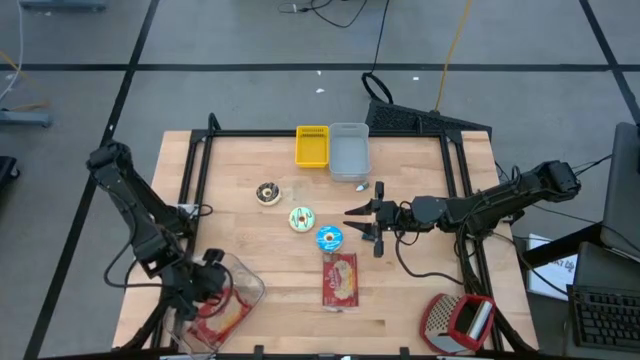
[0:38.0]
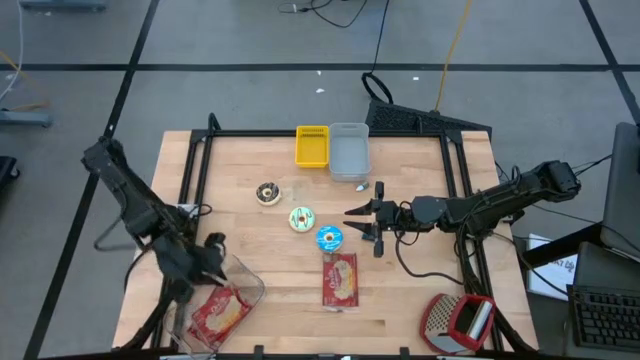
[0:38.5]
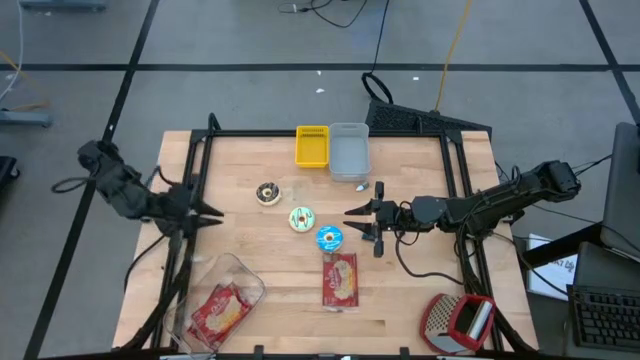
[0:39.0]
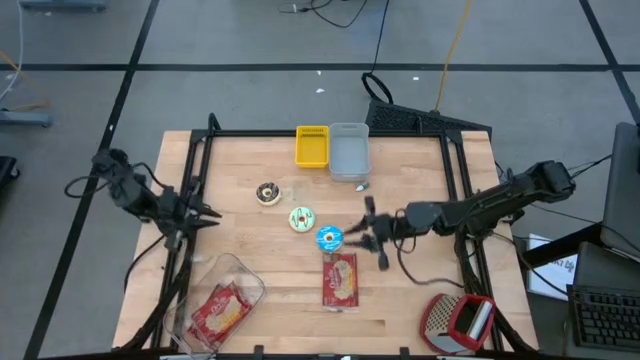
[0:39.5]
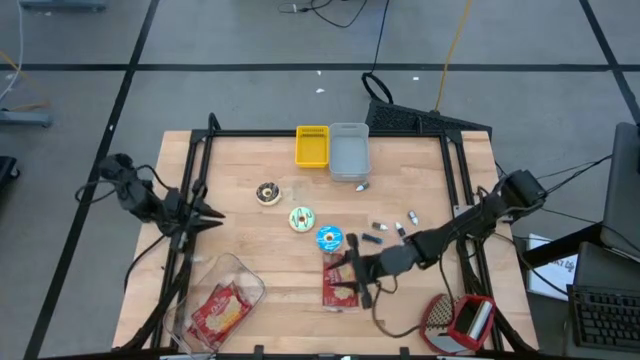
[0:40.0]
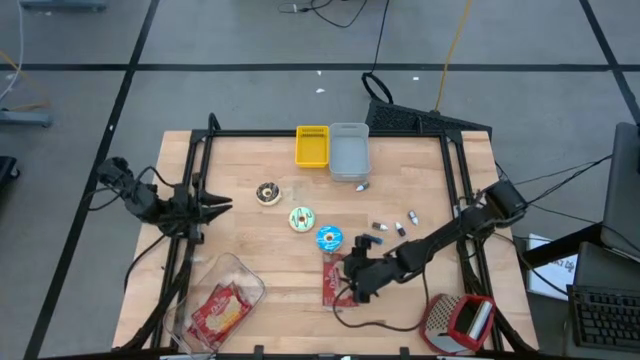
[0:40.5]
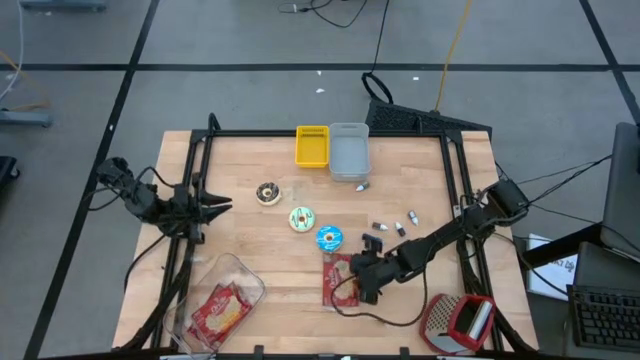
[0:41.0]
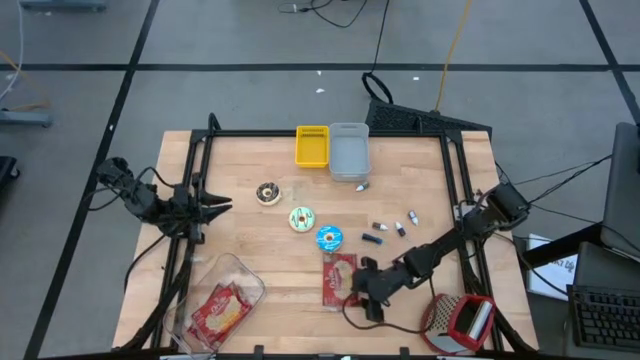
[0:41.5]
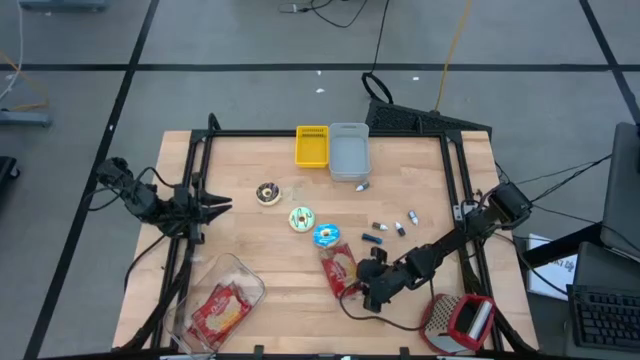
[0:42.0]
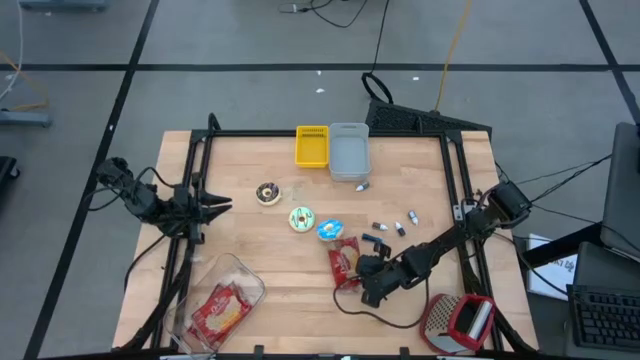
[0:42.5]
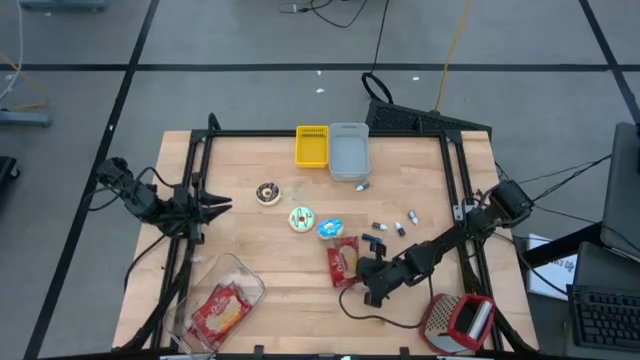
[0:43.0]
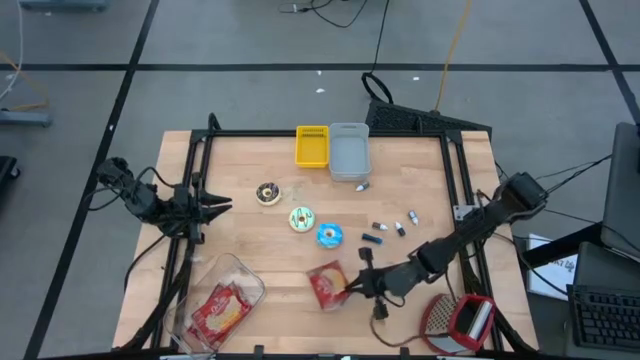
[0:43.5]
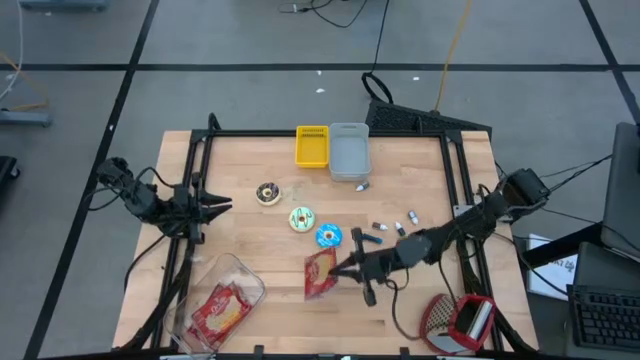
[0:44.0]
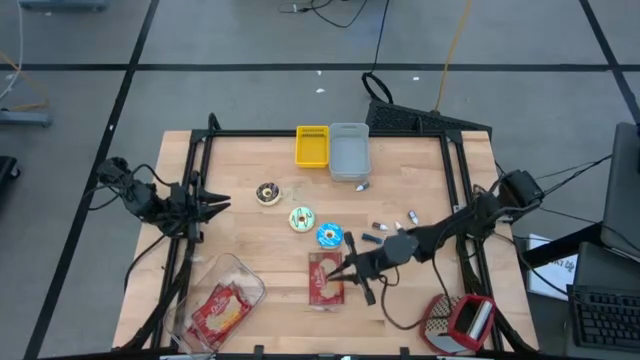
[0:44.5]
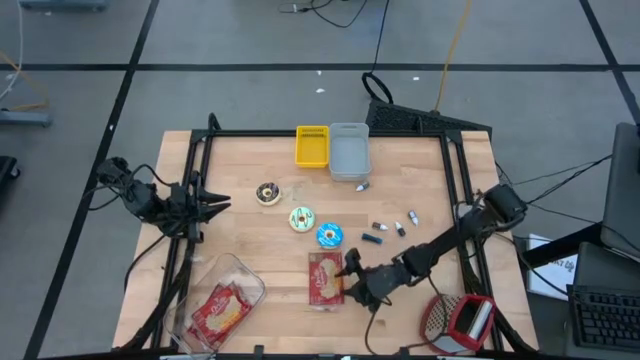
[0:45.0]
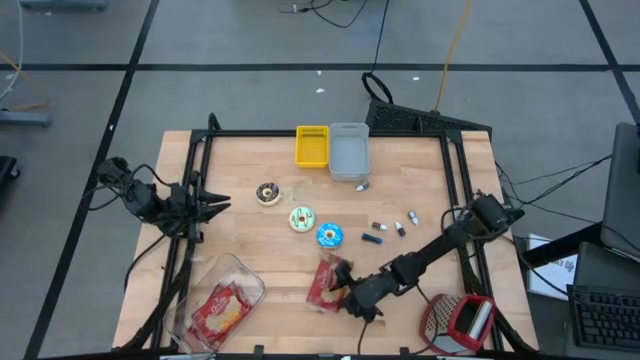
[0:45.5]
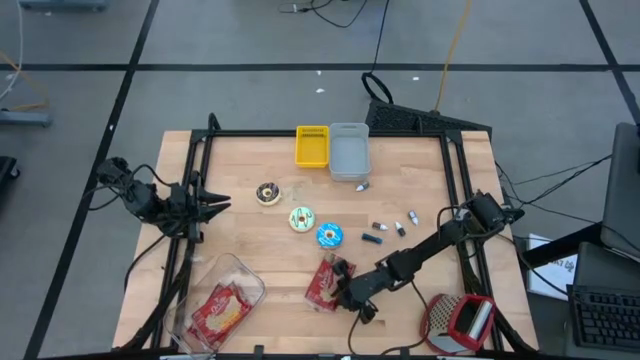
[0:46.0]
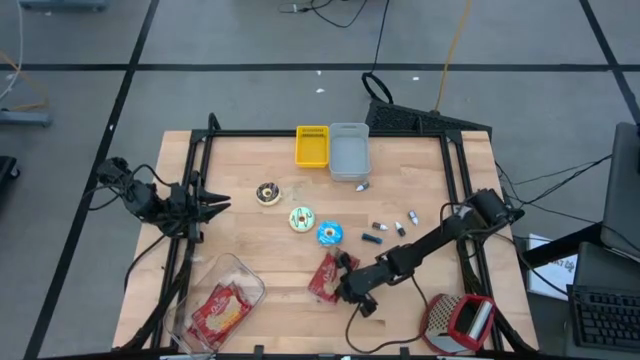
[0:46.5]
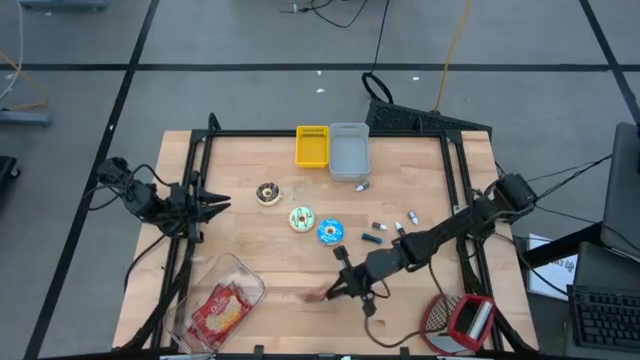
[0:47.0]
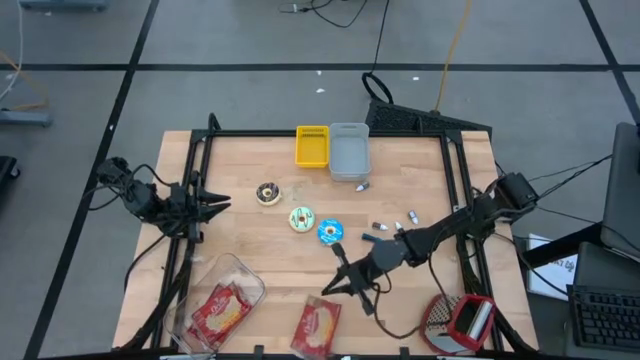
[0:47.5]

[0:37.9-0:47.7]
Stack the red popcorn bag on top of the red popcorn bag in the transparent bin

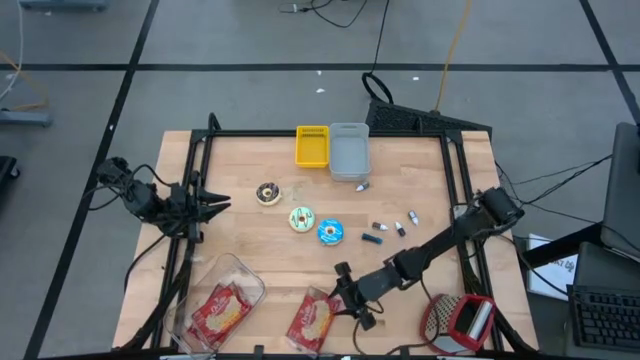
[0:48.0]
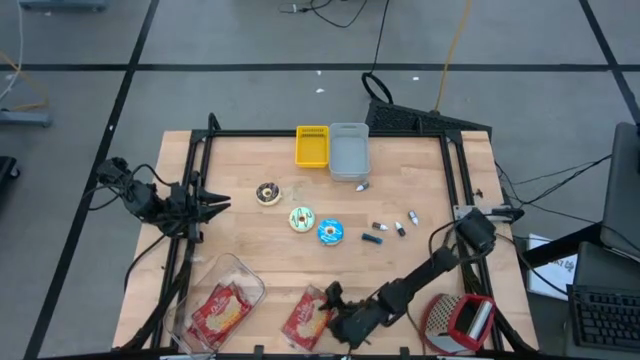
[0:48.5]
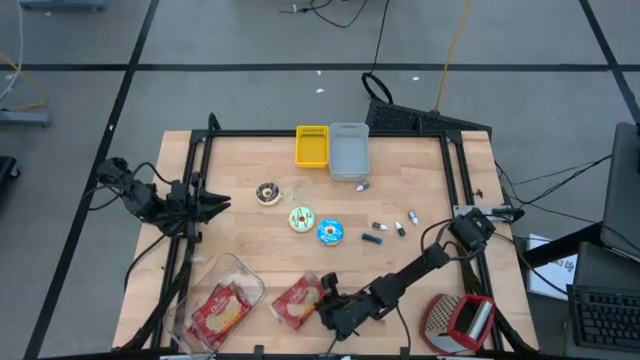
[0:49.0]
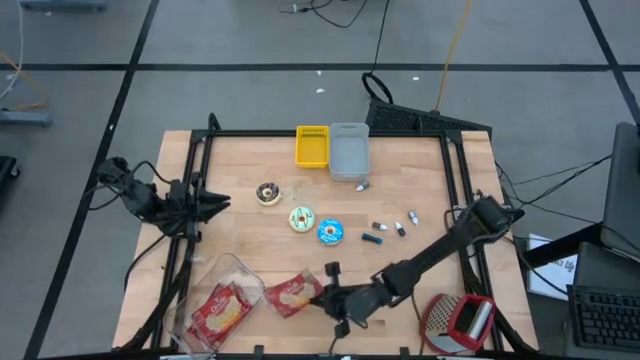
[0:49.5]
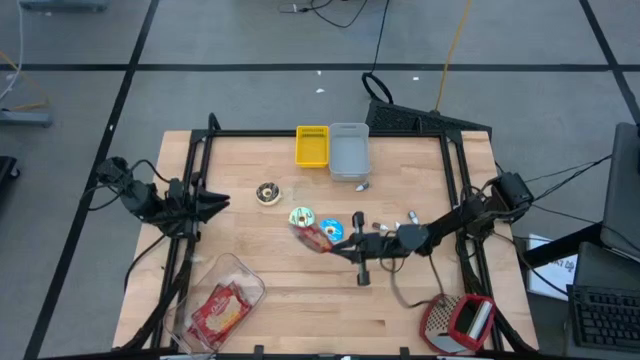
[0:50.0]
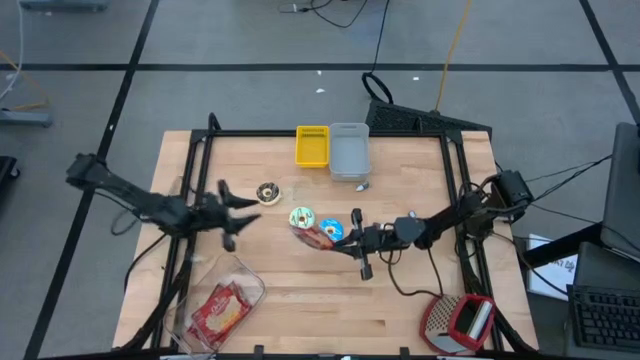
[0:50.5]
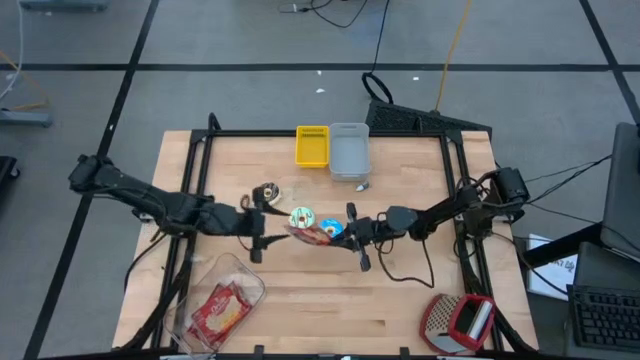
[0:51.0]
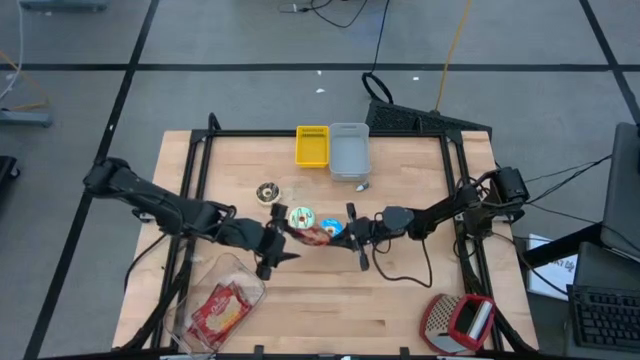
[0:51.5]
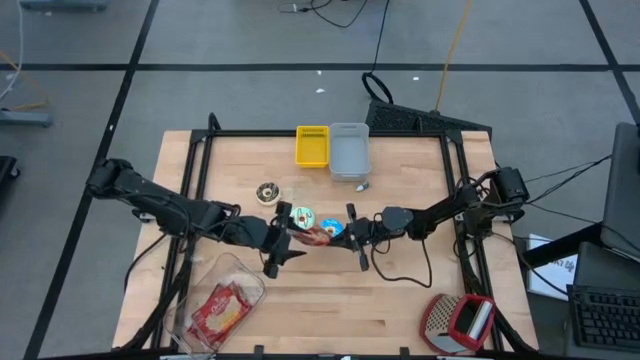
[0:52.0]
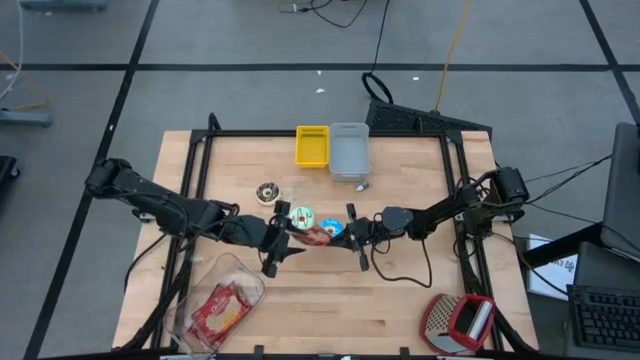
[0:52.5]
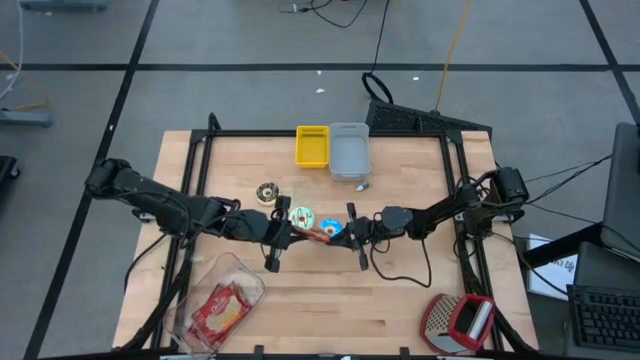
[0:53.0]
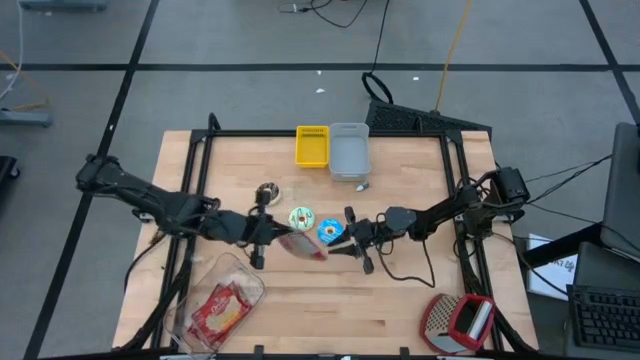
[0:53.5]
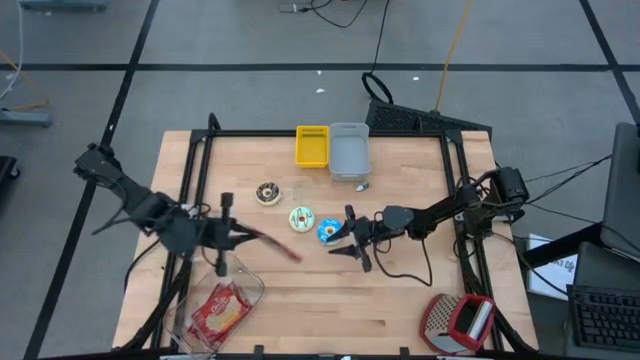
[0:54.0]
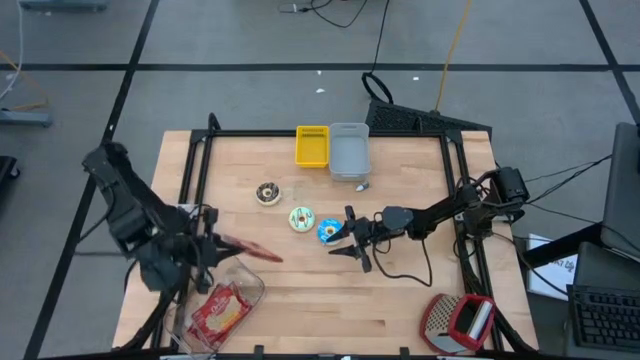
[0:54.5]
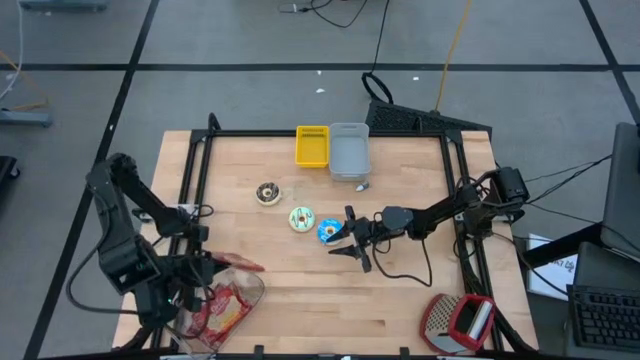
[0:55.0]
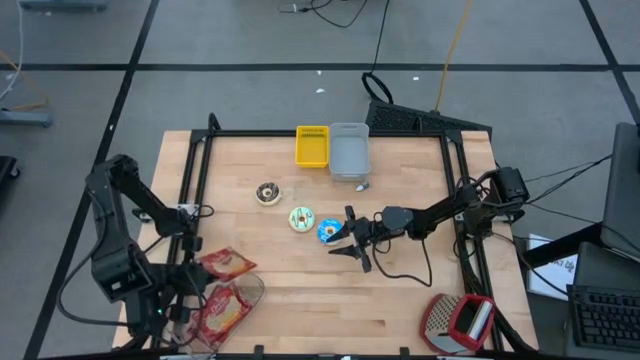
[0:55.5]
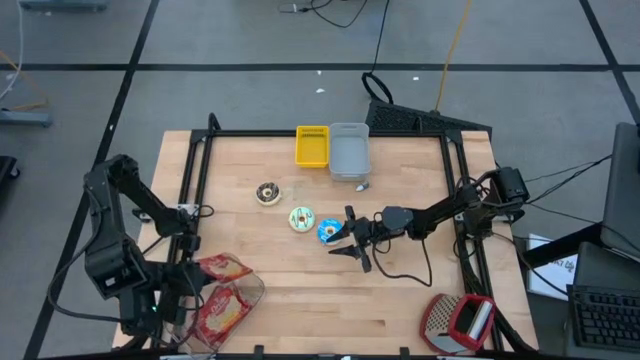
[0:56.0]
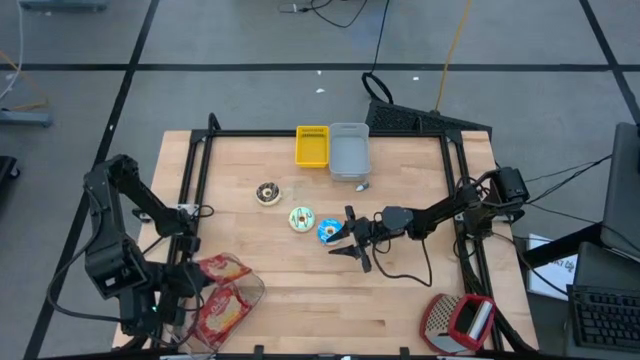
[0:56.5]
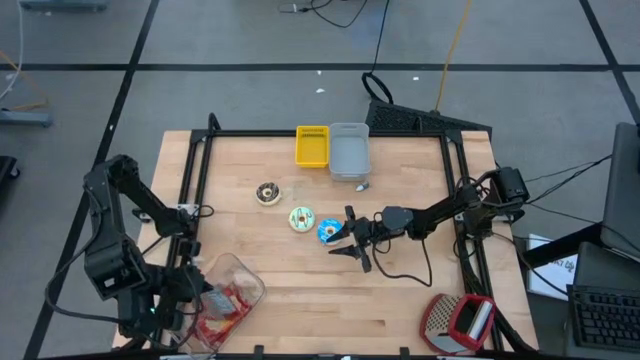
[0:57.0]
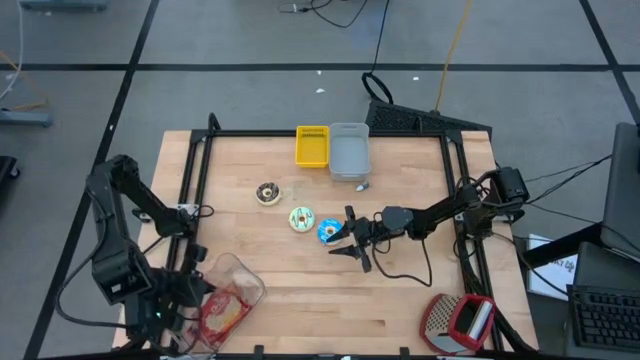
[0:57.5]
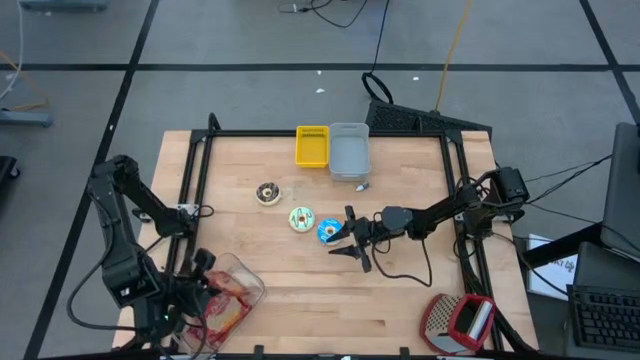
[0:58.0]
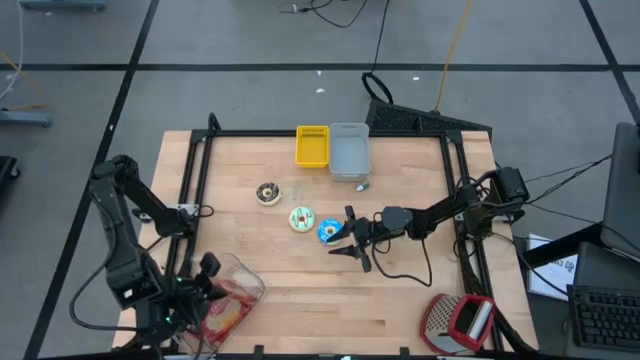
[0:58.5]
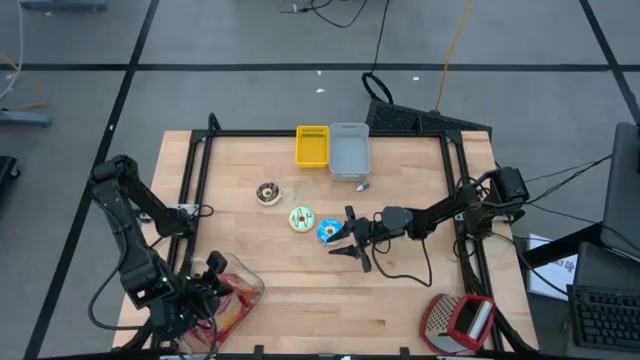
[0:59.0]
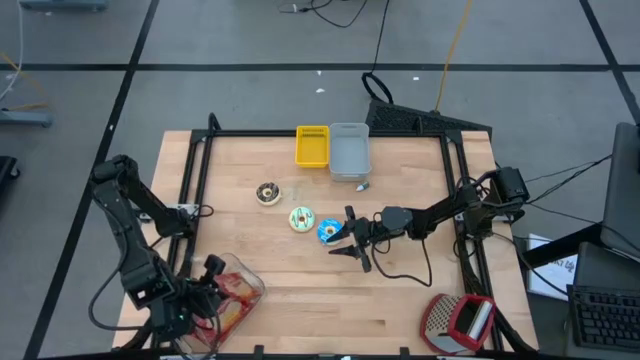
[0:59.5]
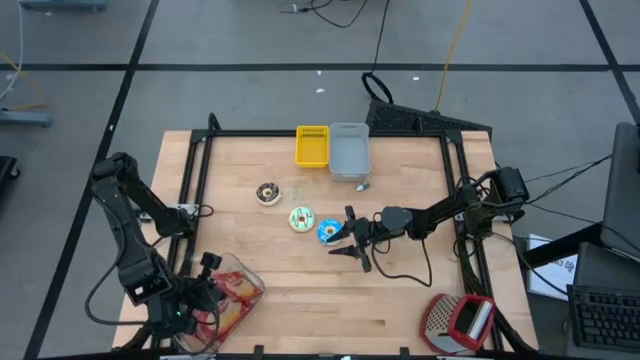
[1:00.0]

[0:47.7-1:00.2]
Stack the red popcorn bag on top of the red popcorn bag in the transparent bin
